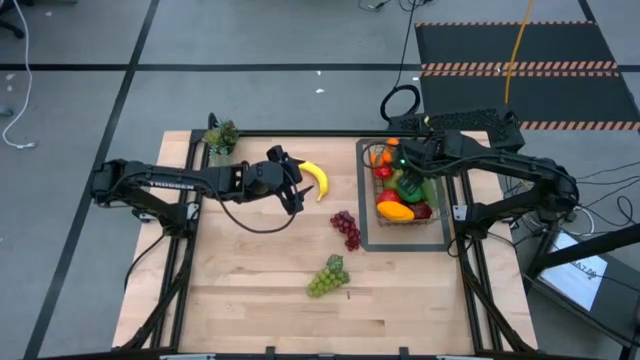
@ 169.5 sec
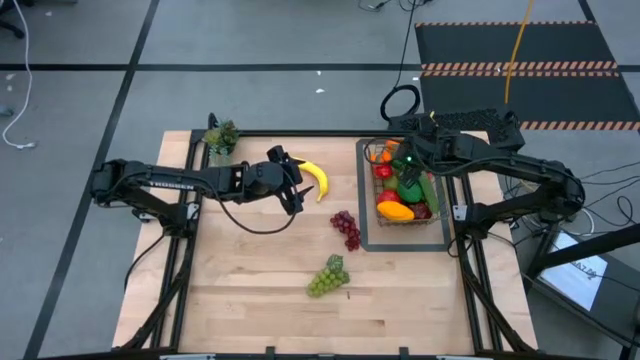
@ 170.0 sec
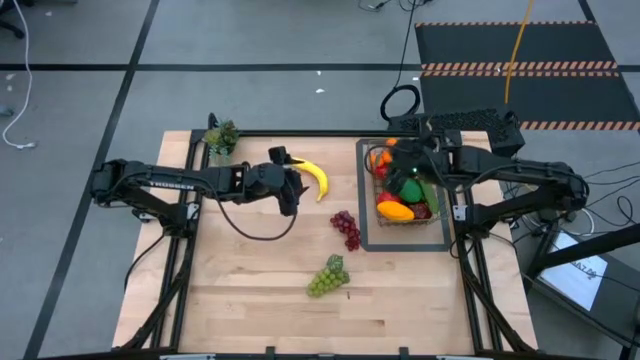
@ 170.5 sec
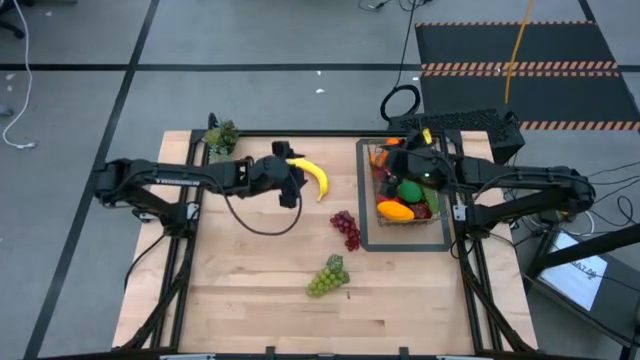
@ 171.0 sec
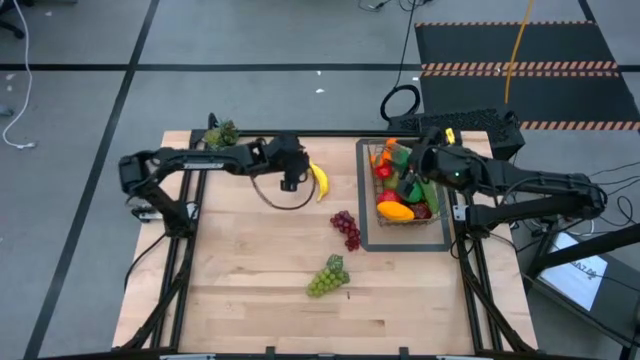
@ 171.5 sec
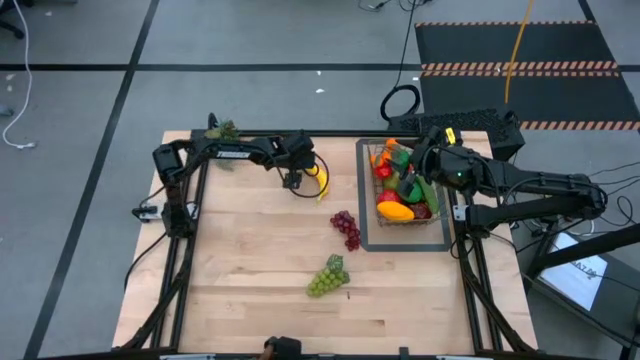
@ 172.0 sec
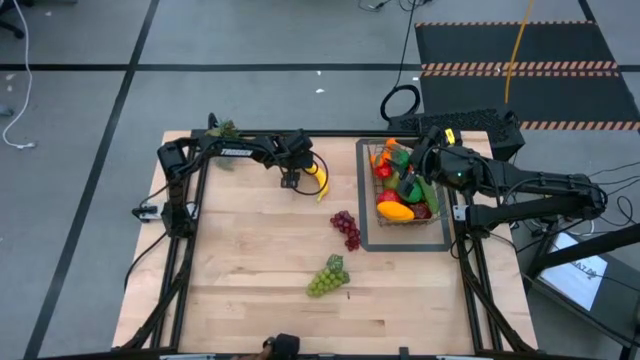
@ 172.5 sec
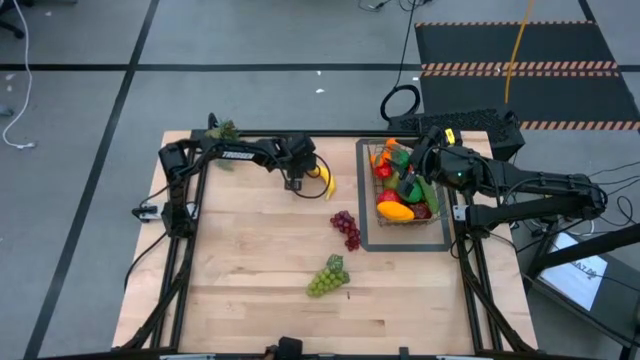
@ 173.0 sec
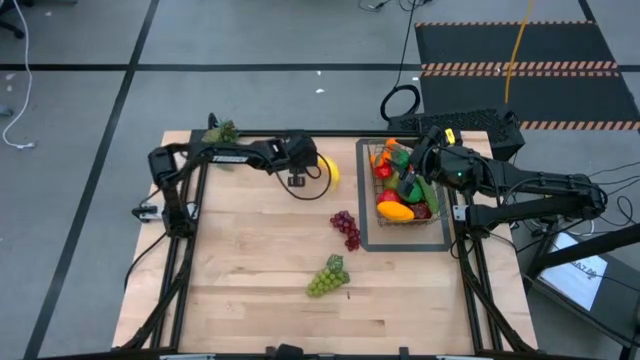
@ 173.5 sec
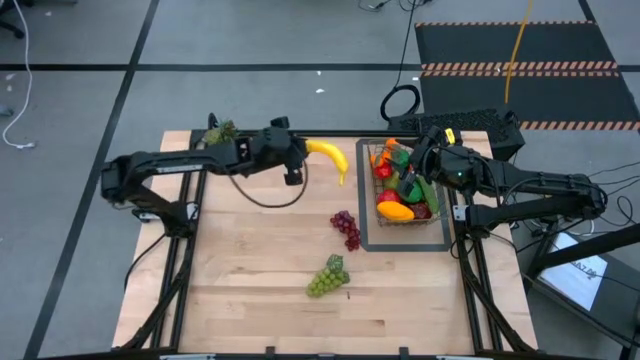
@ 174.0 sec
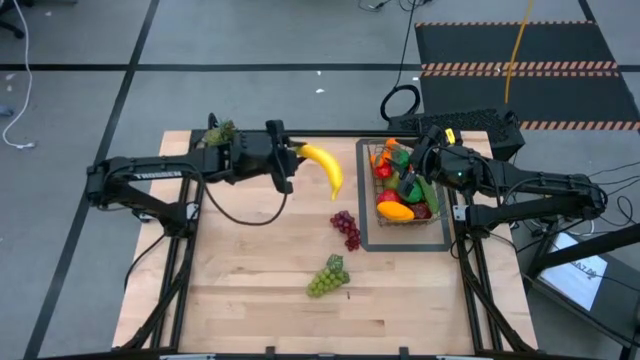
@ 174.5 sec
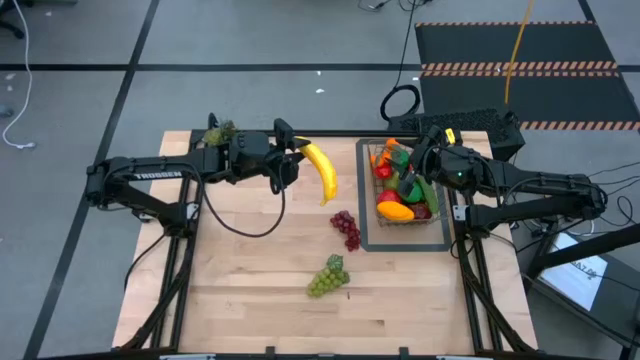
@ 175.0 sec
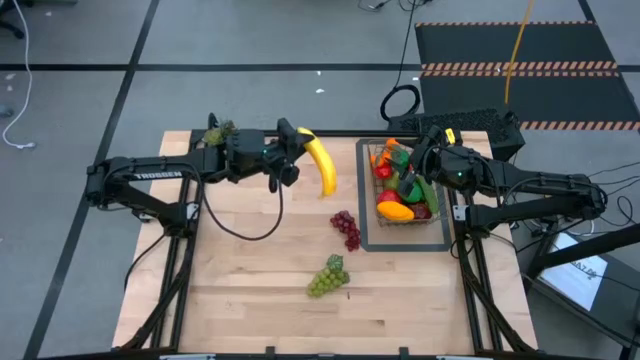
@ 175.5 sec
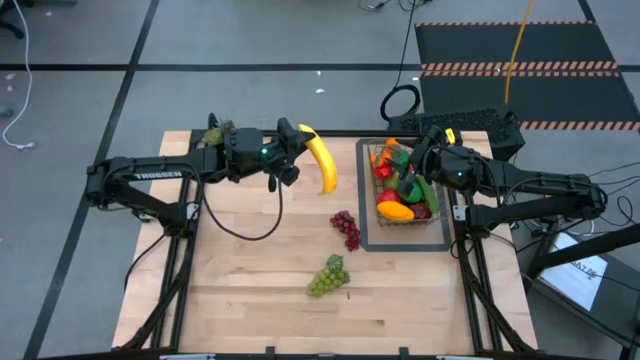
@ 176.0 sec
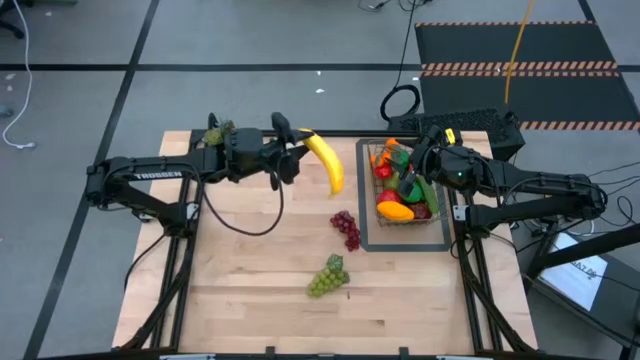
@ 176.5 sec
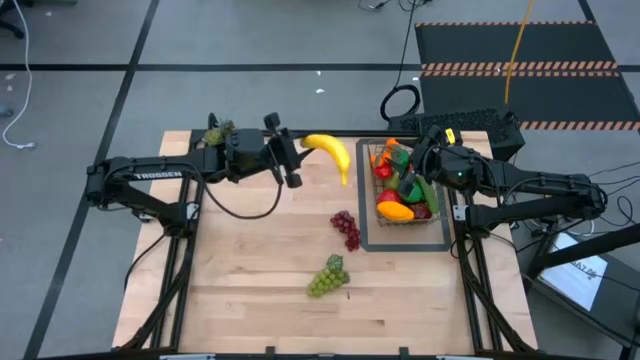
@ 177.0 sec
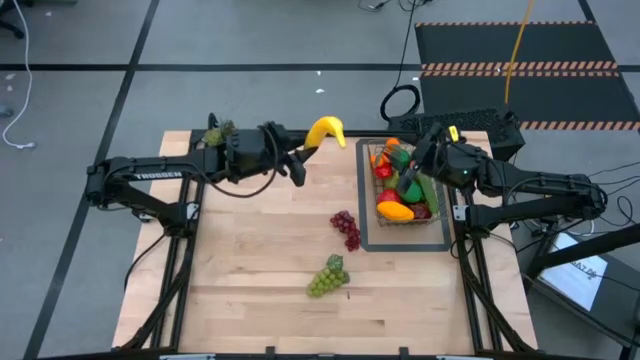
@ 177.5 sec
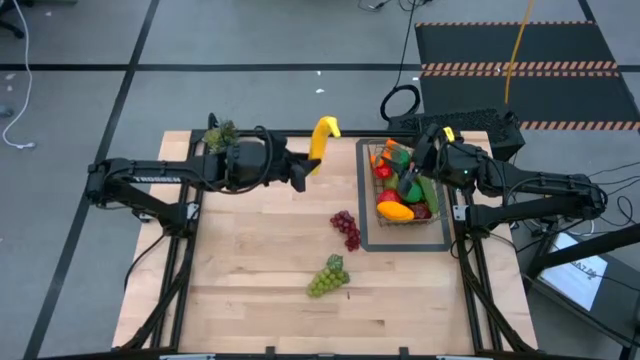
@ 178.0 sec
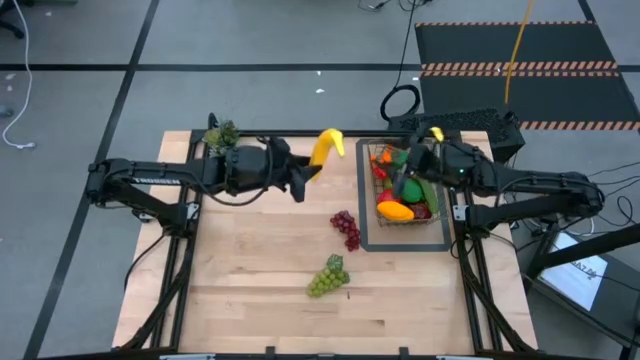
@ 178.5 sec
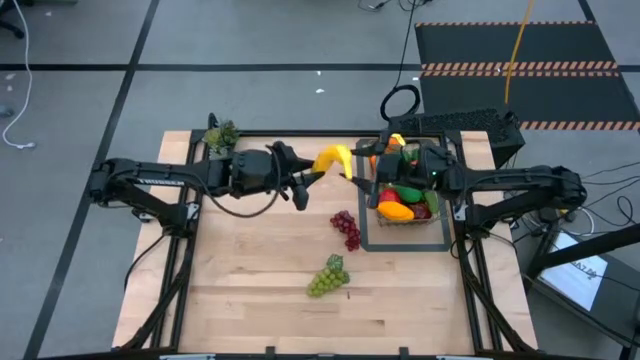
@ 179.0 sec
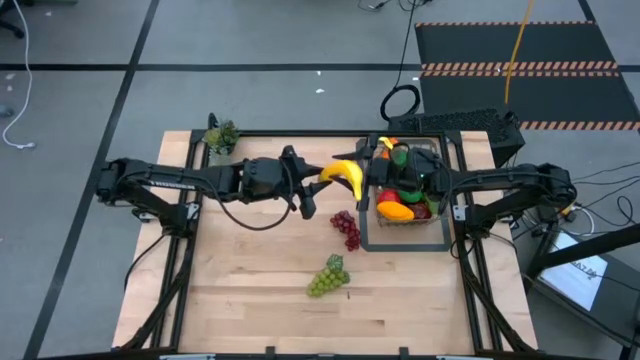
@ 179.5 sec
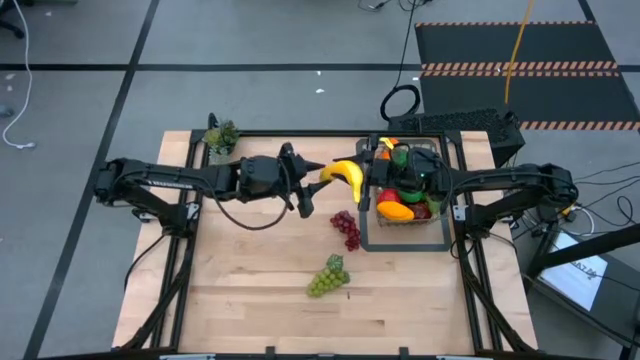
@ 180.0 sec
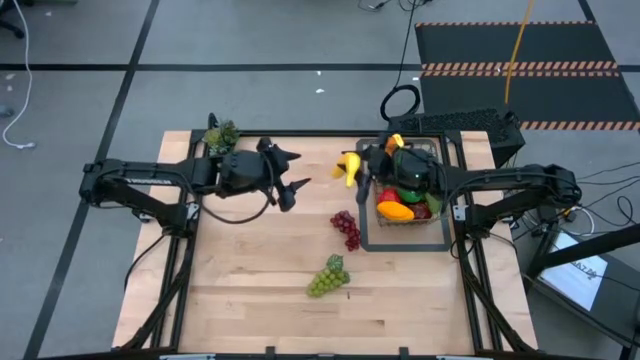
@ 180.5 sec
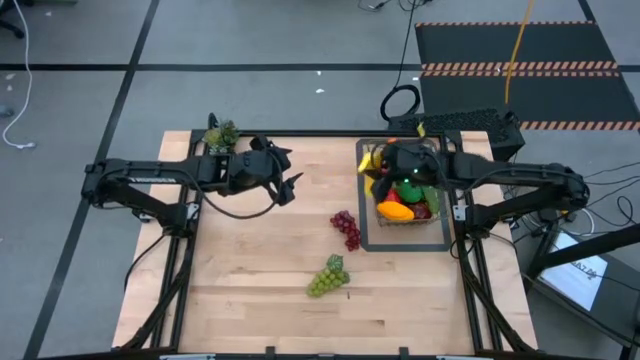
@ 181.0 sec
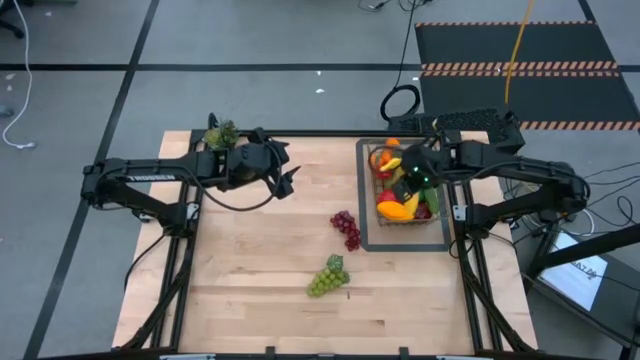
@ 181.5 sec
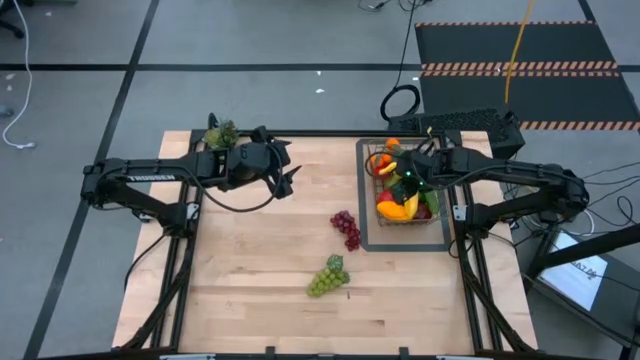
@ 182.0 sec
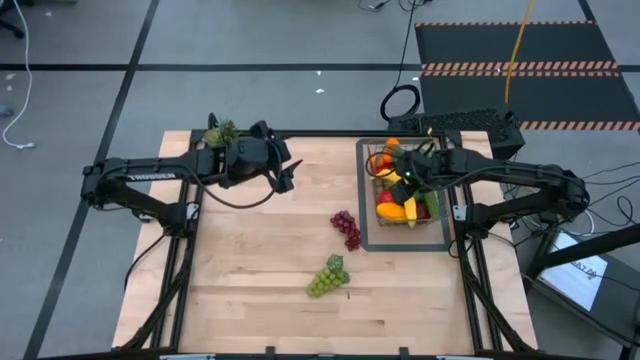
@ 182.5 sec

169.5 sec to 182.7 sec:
Task: Build produce basket
Put the banana into the gold wire basket

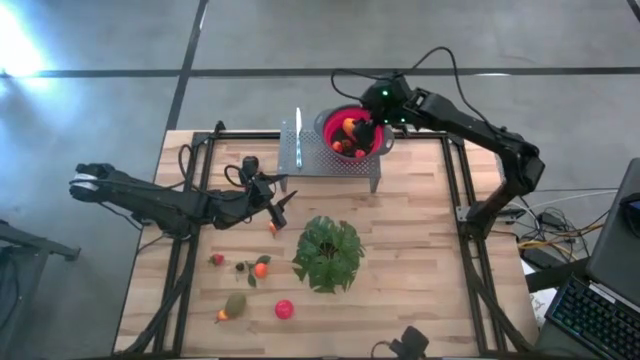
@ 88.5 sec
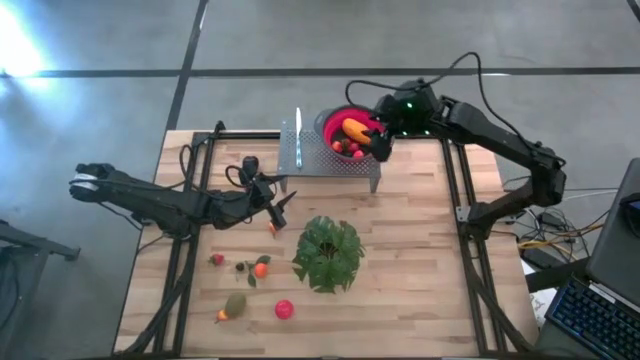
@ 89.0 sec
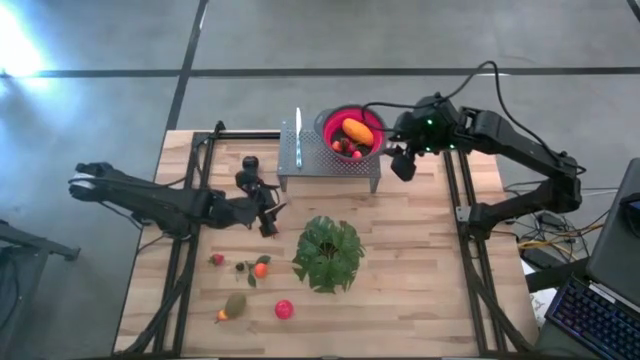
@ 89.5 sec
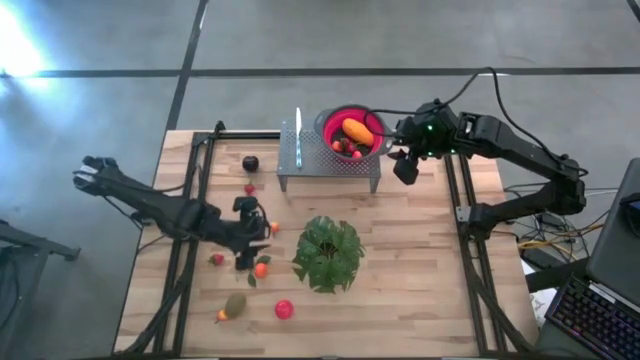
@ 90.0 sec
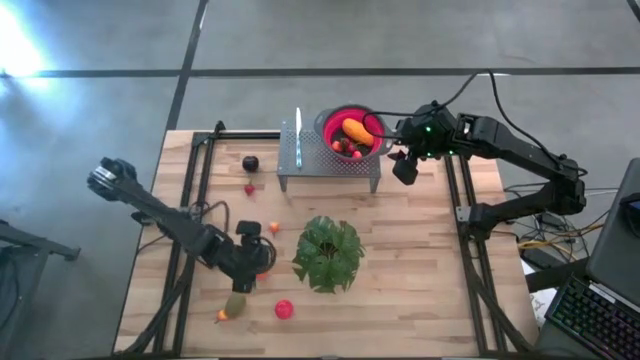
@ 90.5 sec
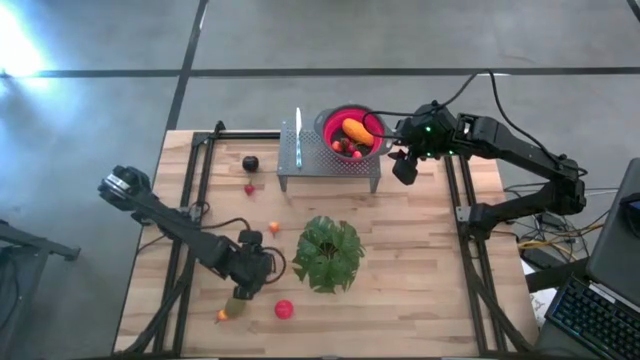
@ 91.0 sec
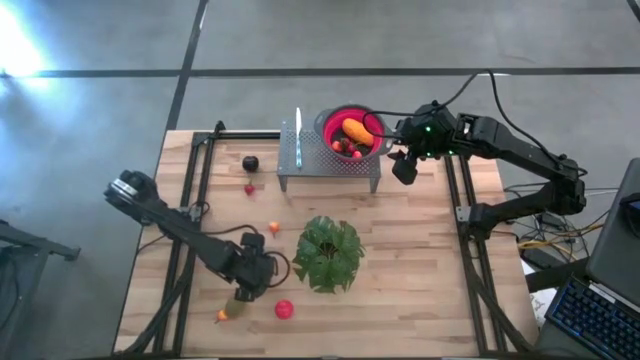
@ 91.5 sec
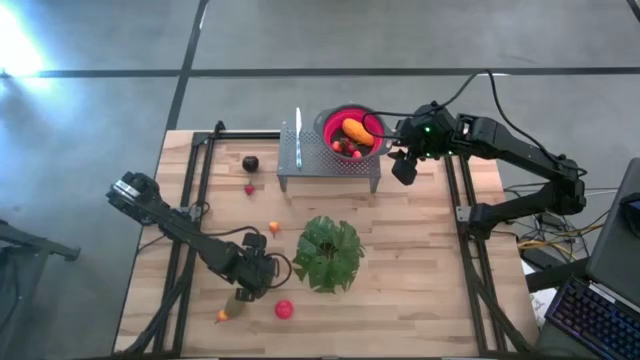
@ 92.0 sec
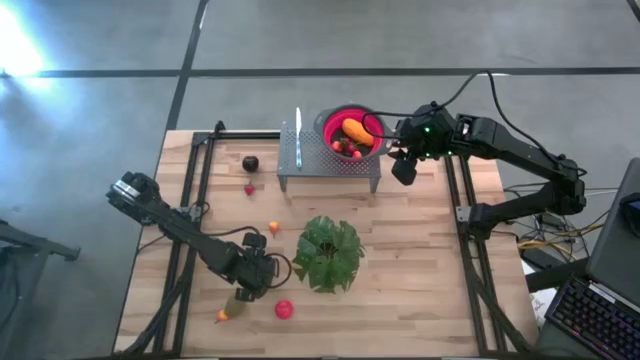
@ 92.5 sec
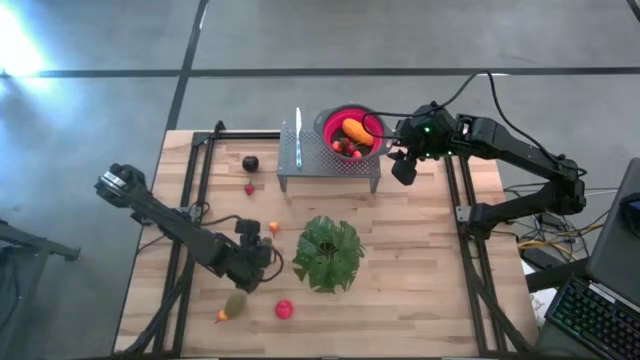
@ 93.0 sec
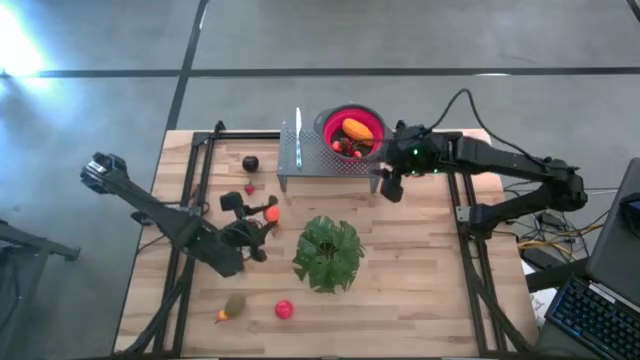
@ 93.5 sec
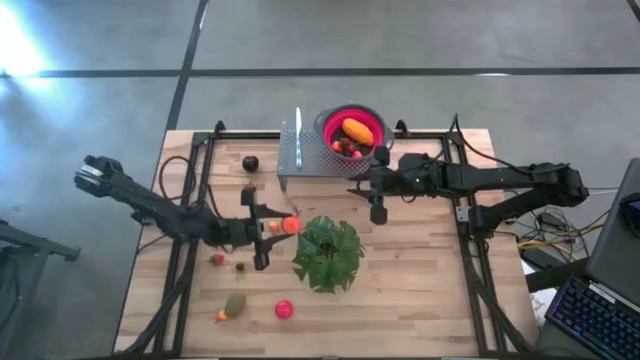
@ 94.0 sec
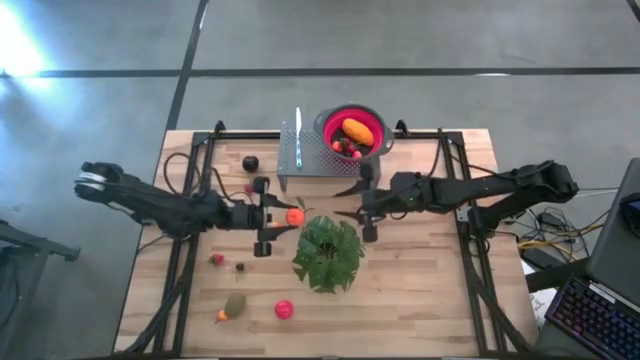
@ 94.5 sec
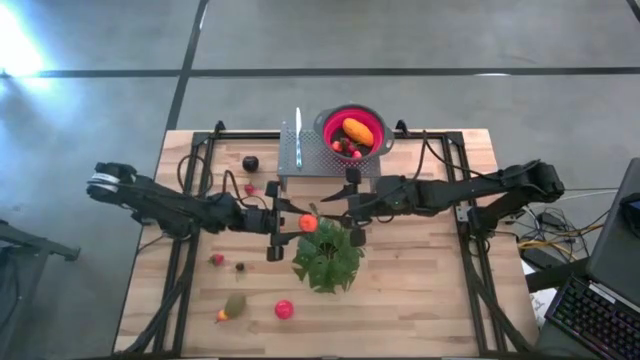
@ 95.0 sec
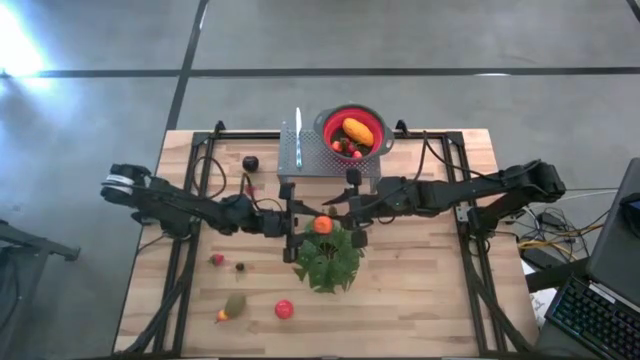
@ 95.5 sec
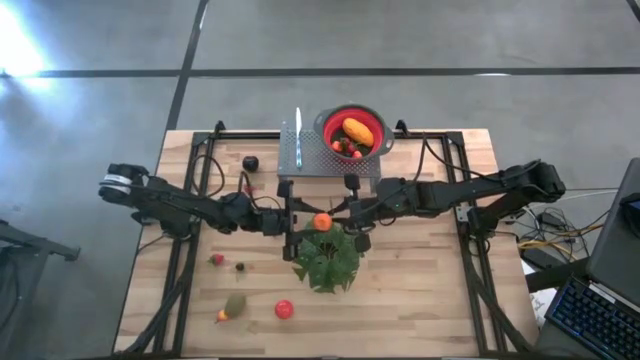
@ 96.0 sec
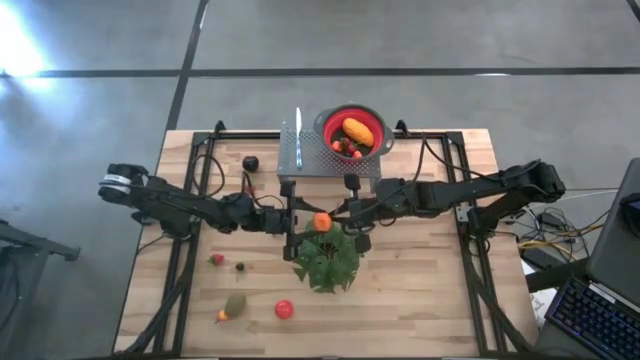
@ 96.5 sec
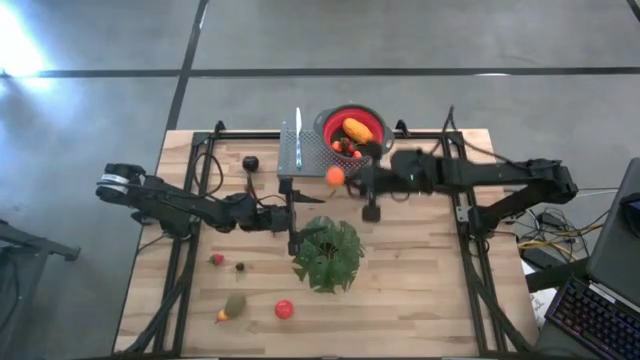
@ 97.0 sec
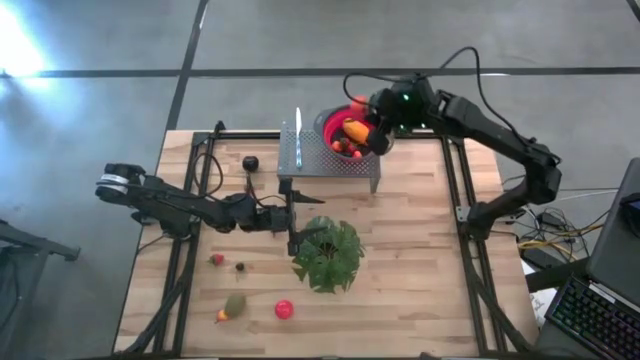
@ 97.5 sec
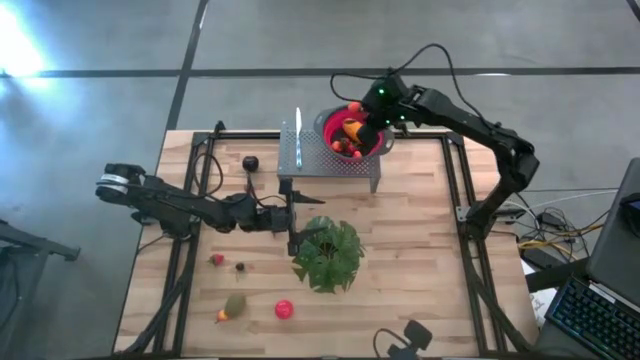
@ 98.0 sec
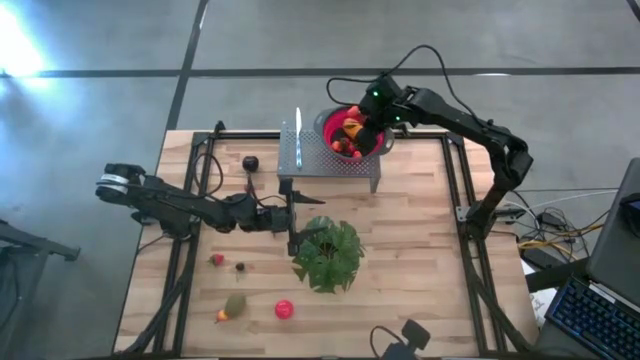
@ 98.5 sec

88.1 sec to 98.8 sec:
Task: Pick & Place Fruit
Put the tangerine into the red strainer bowl on the shelf
